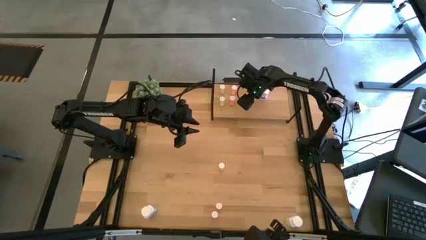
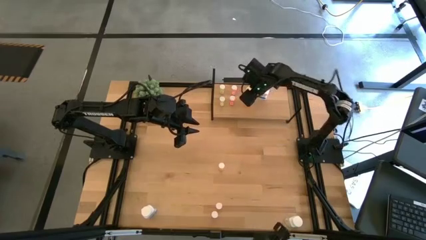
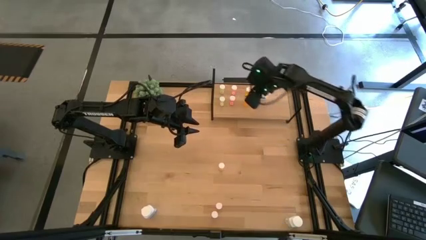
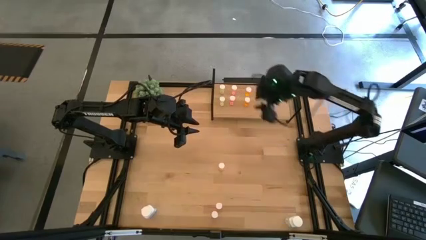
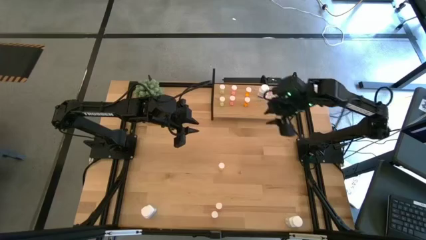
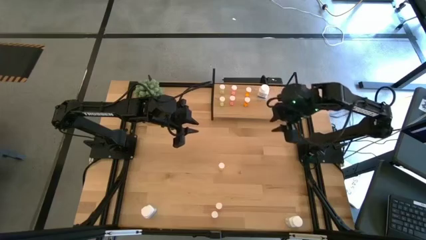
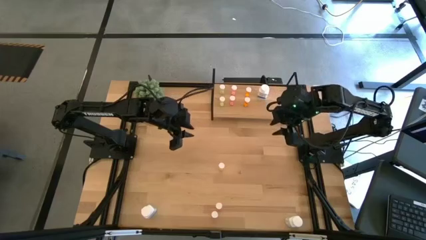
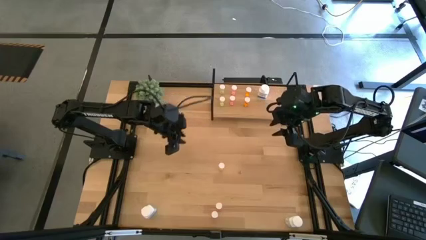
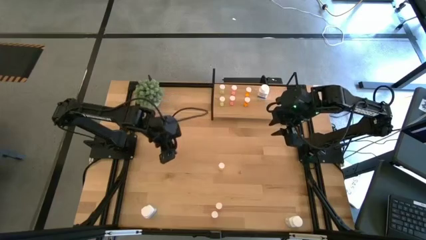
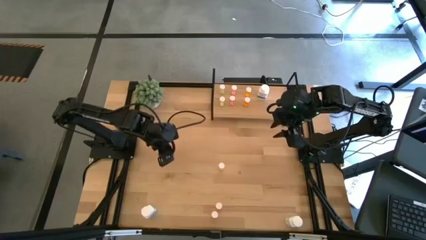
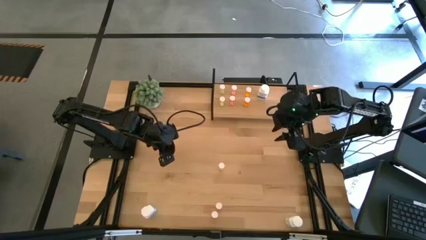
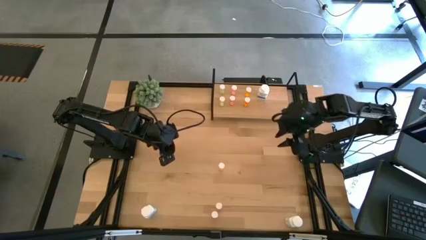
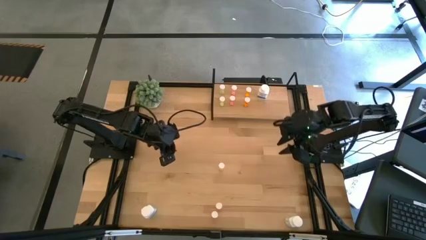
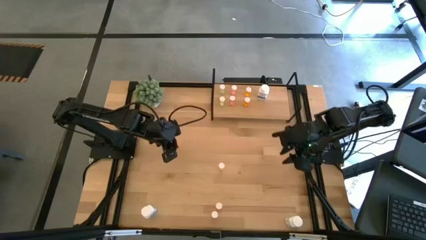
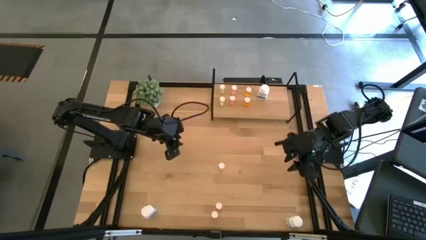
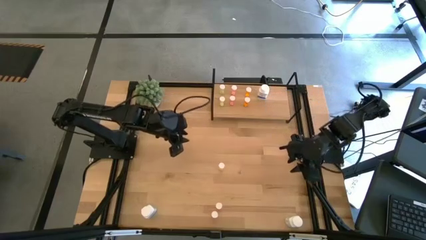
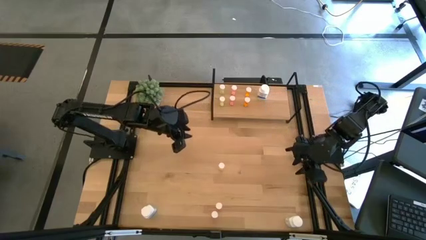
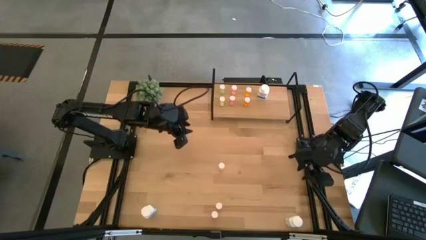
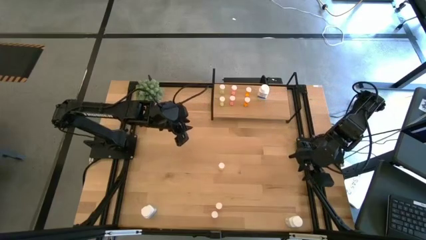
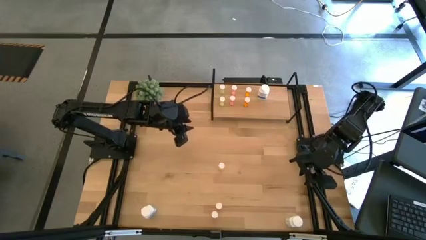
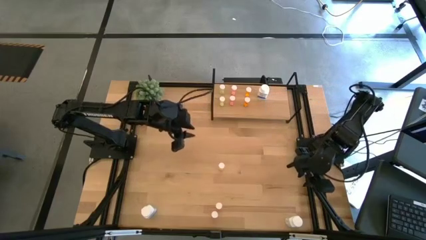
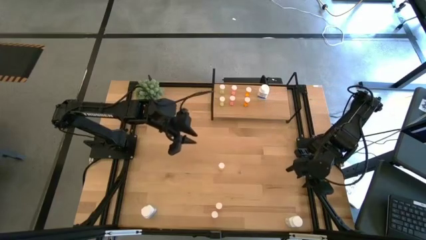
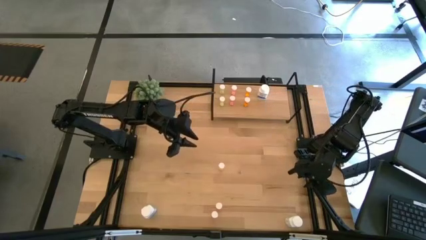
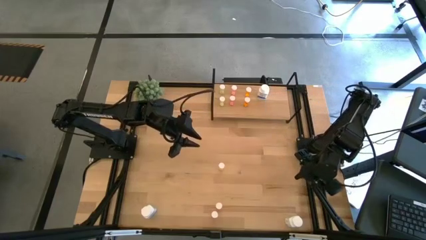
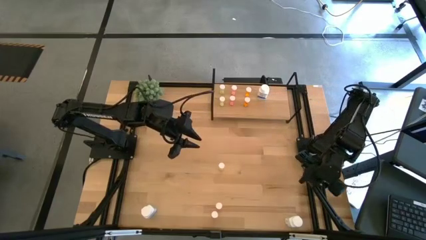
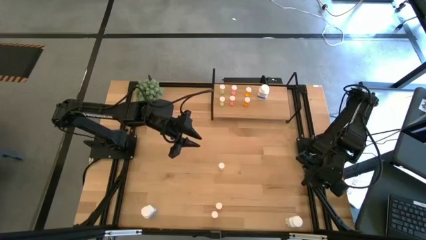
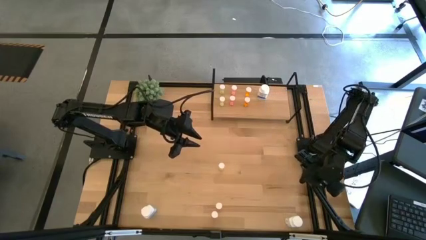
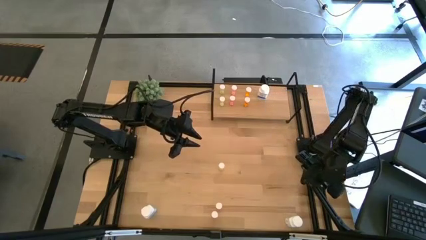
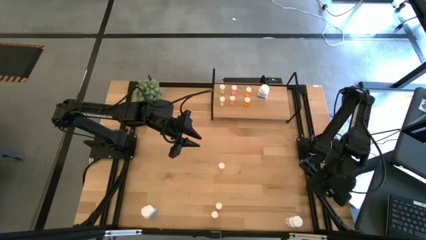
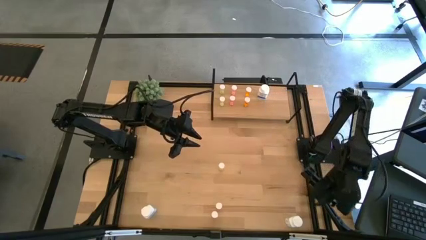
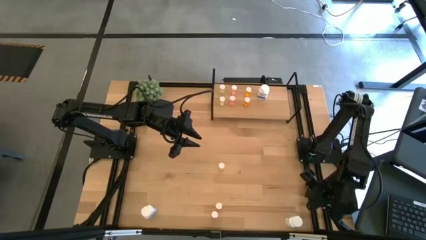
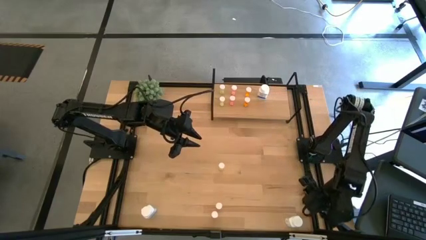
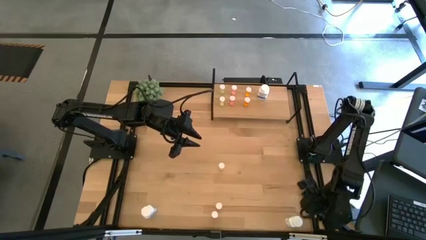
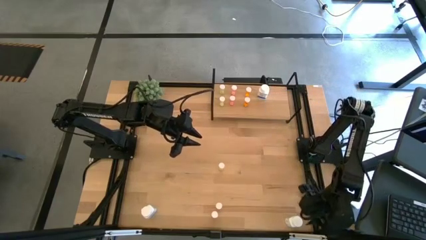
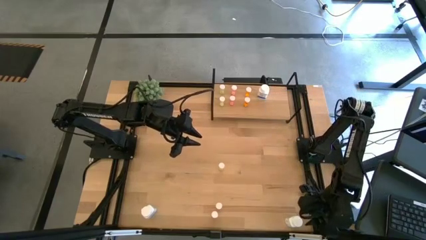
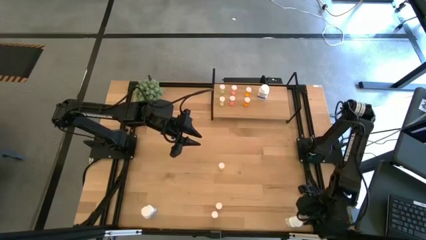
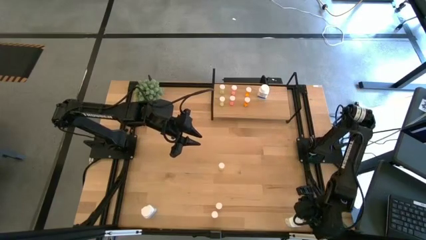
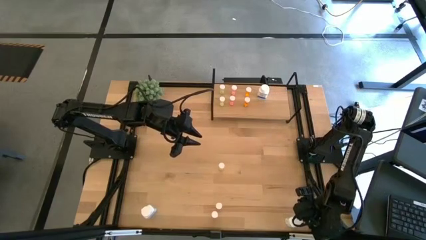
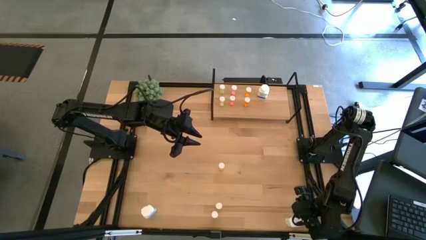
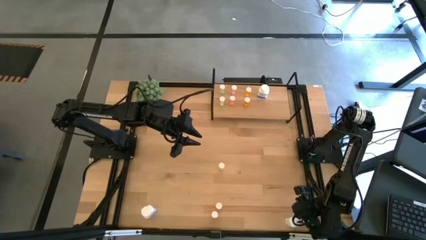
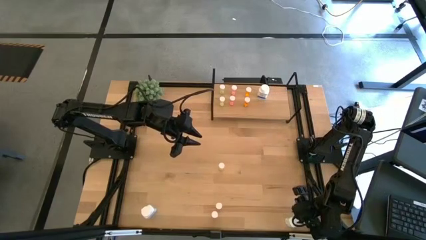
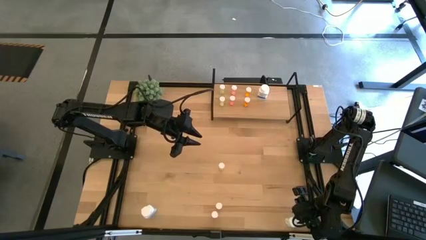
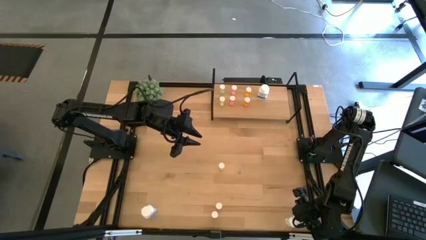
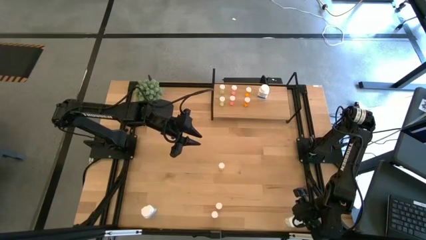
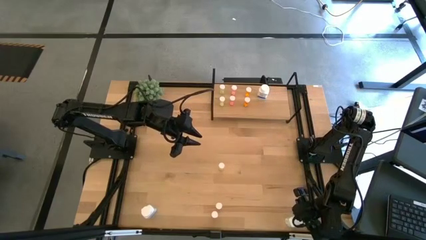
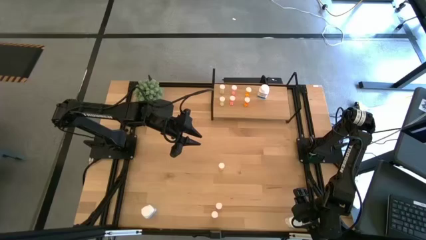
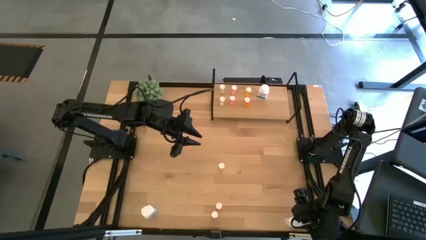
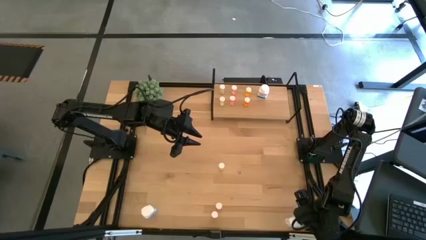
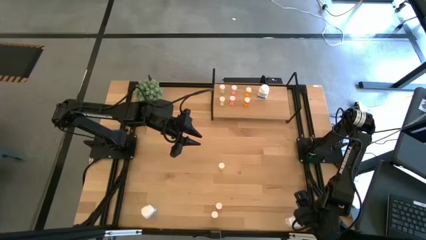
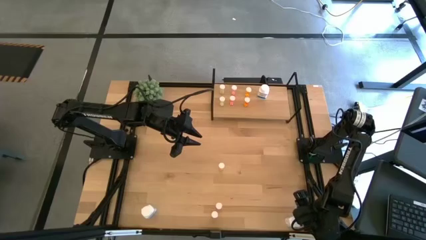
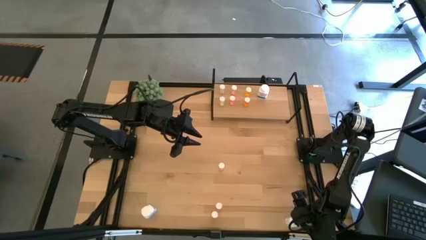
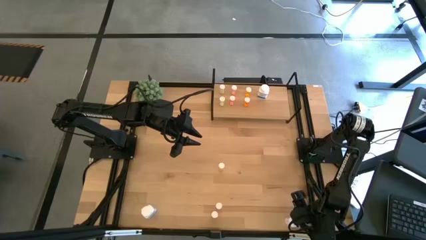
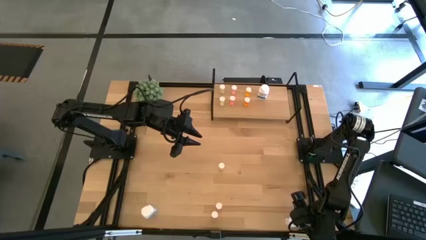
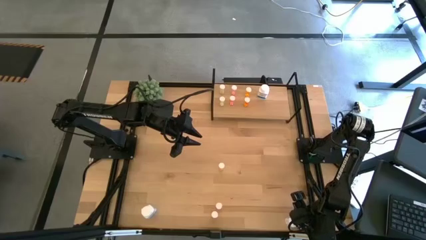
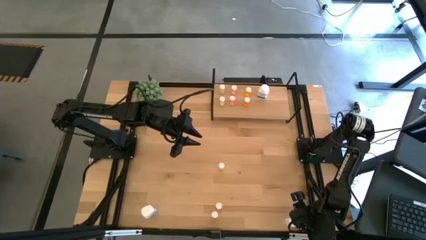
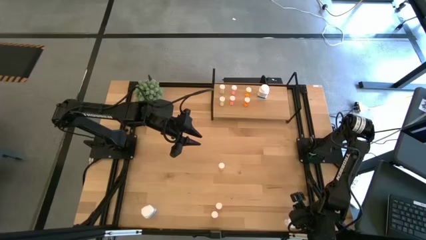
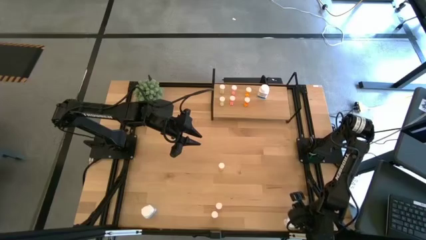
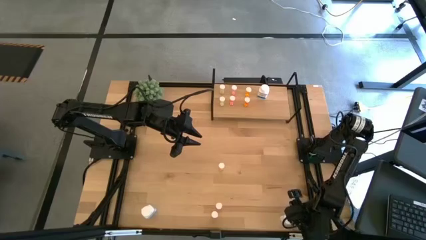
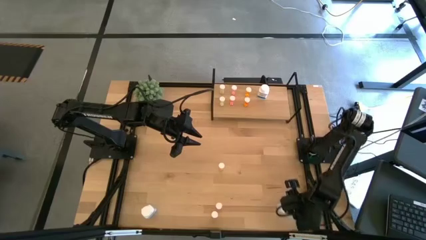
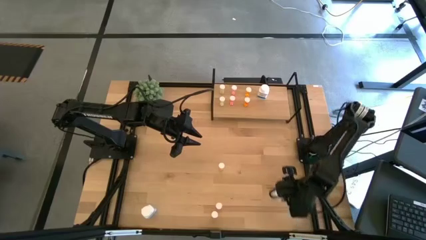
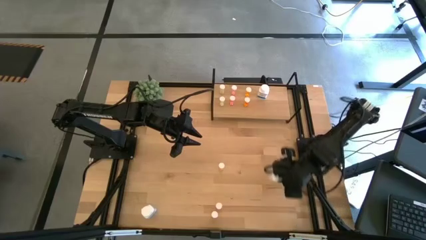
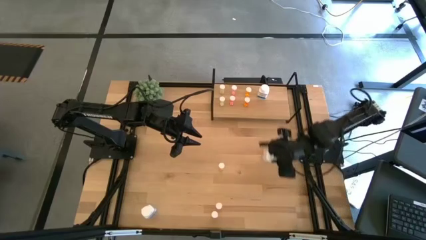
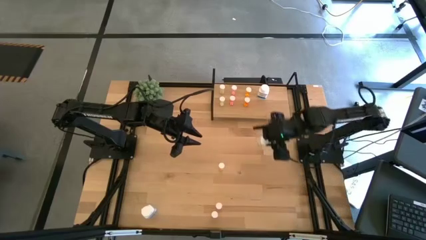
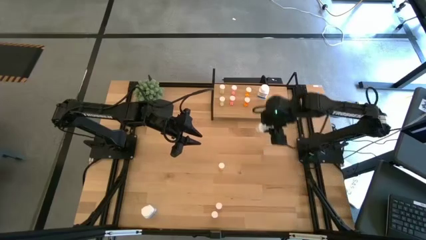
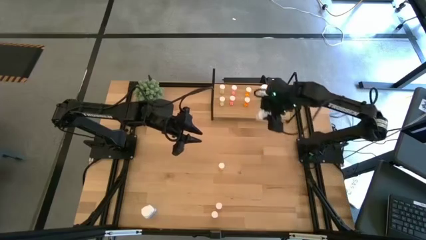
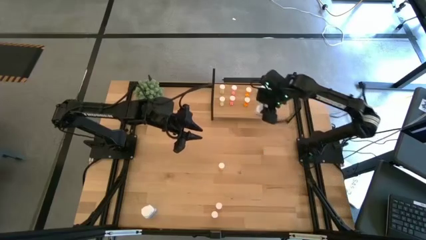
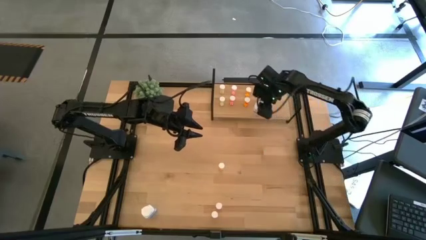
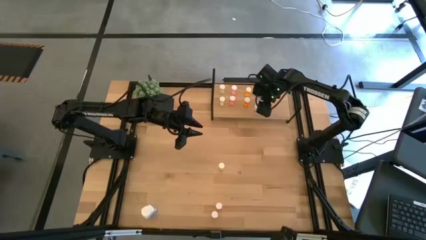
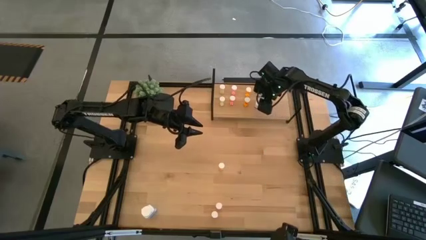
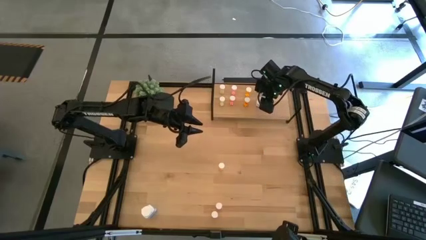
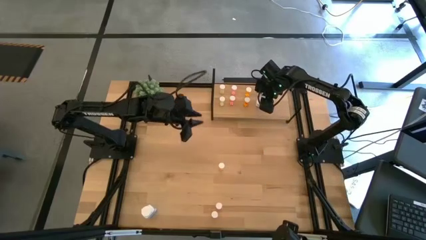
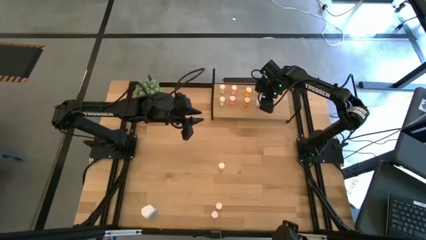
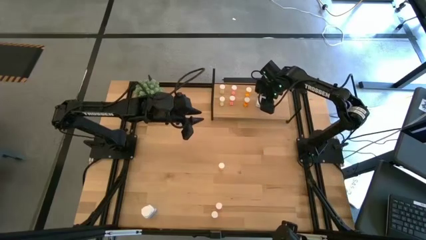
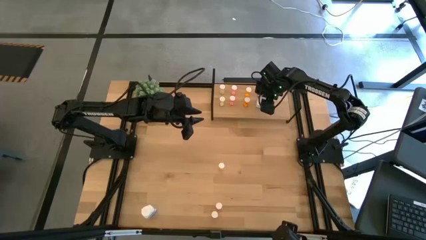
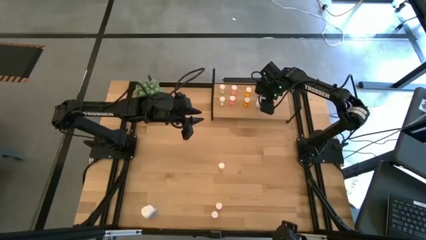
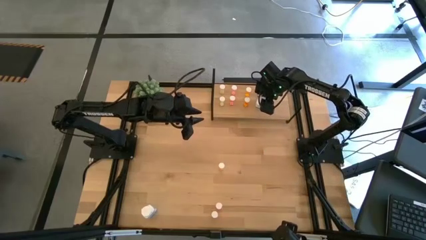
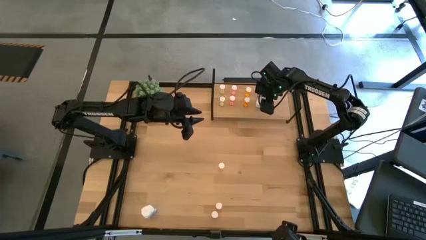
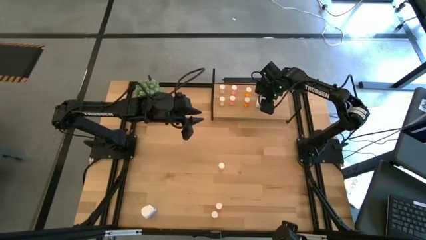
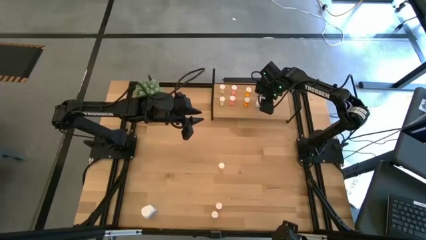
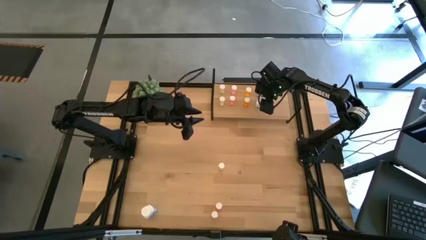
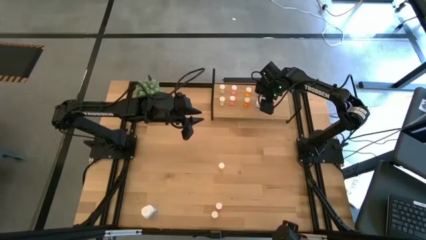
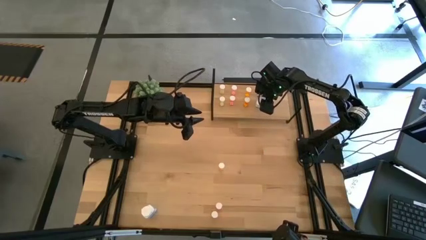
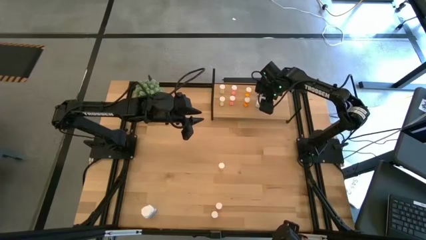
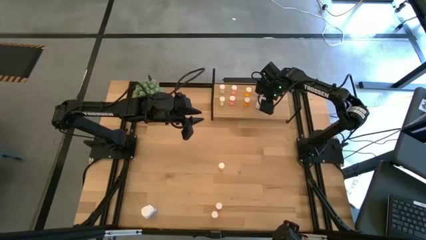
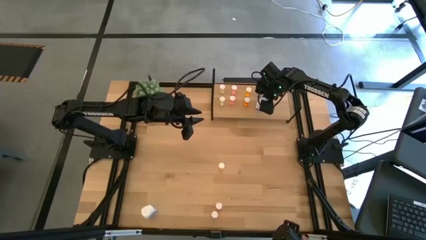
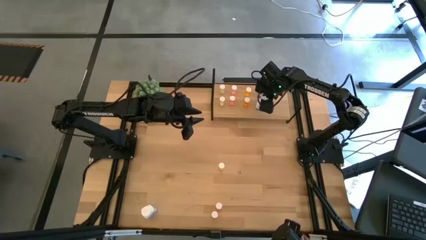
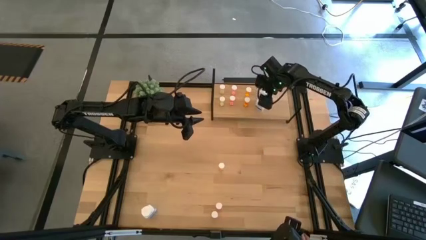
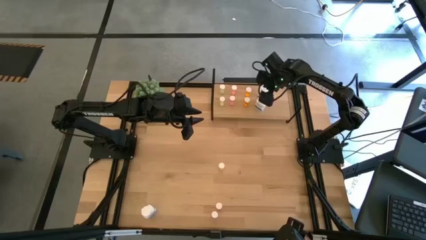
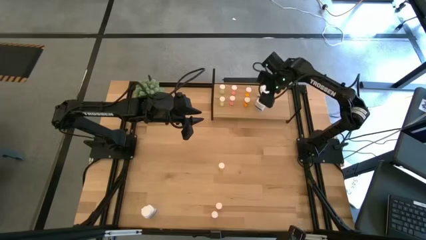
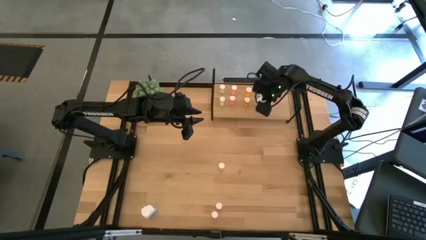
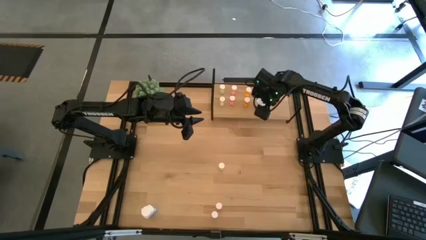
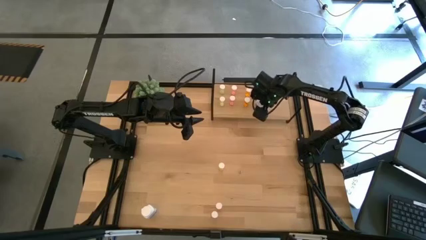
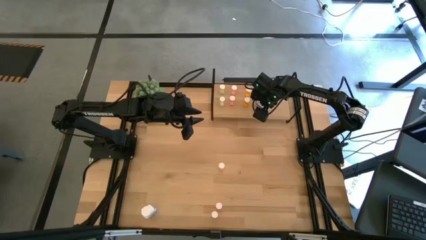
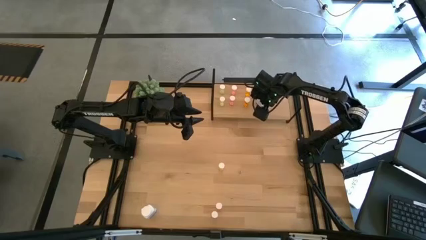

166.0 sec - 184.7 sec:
Task: Pick and place medicine bottles onto shelf by color
Put the right white pill bottle on the shelf aligned with the other white pill bottle
